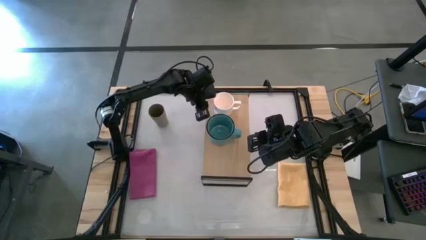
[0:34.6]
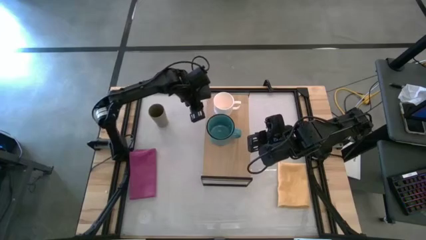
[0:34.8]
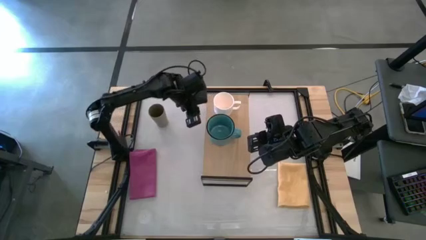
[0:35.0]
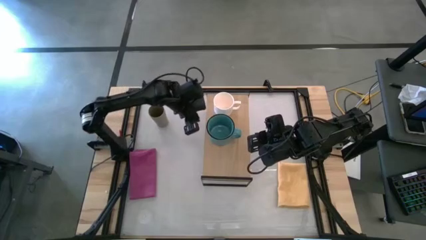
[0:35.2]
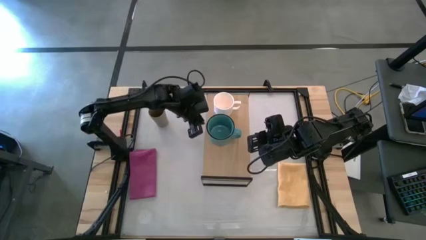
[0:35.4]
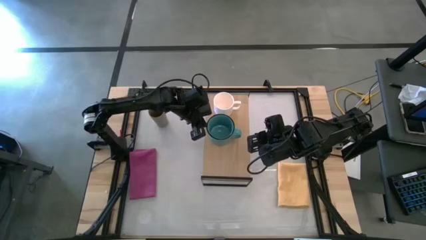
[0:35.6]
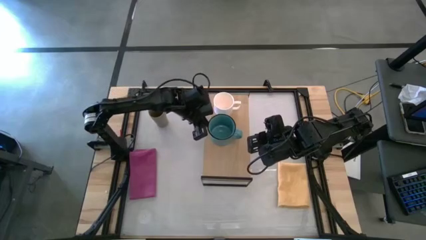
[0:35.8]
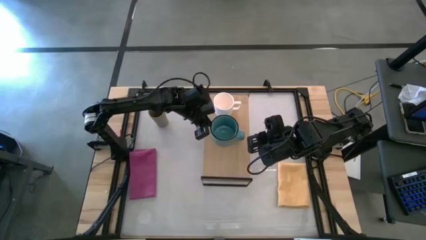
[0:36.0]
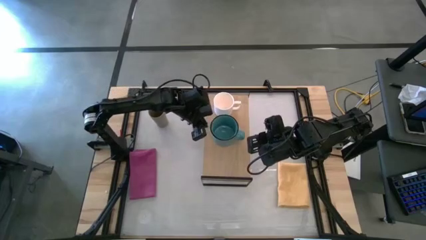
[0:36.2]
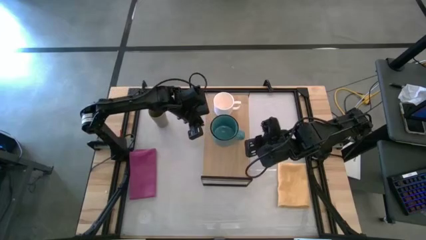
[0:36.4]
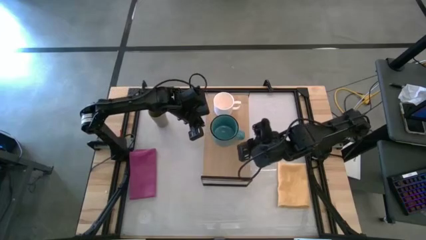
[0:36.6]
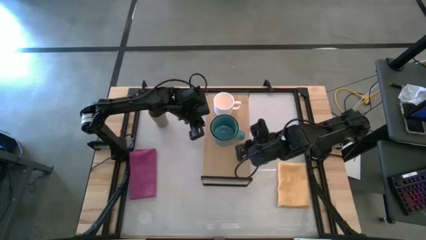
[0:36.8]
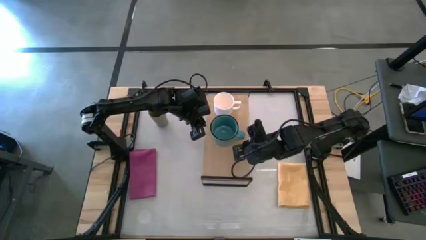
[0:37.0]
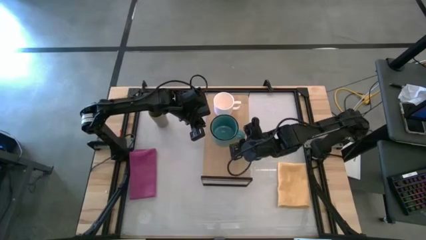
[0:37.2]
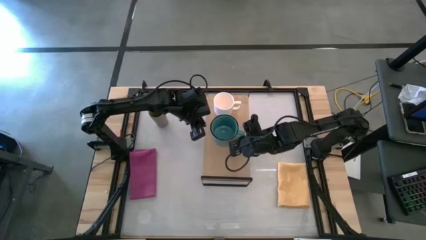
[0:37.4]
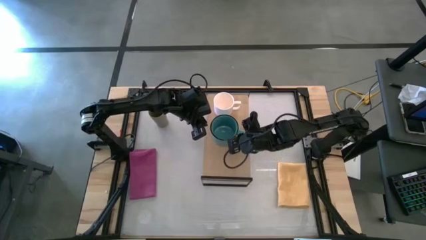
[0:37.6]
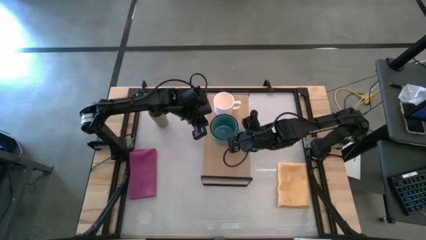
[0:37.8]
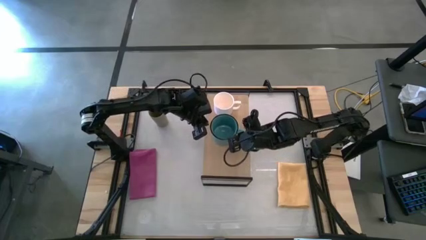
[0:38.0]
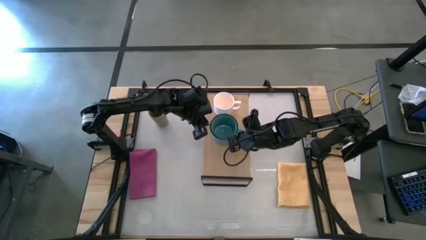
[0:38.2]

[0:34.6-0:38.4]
Task: Stack small to large cups/mugs on shelf
Adjust the blue green mug on the shelf

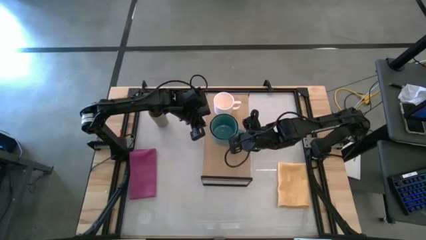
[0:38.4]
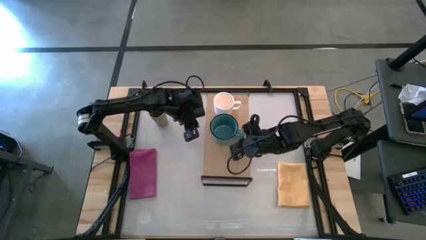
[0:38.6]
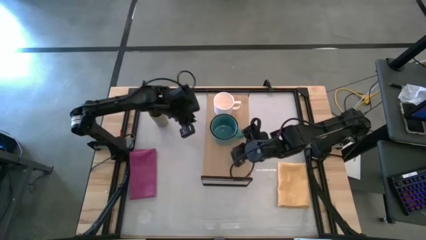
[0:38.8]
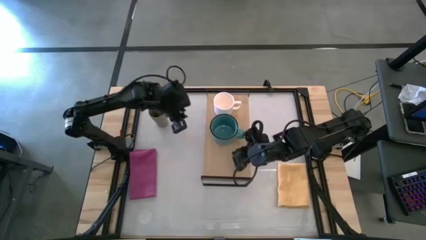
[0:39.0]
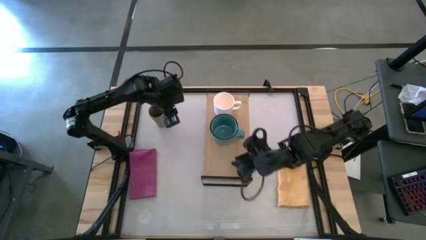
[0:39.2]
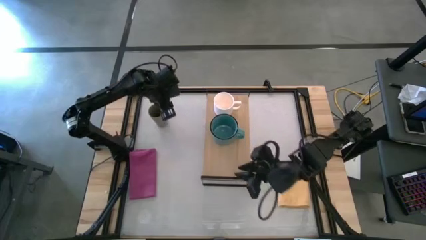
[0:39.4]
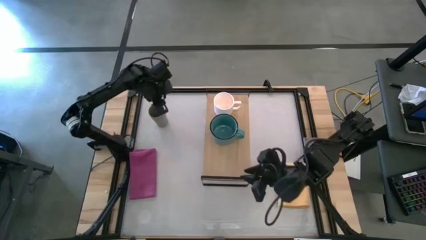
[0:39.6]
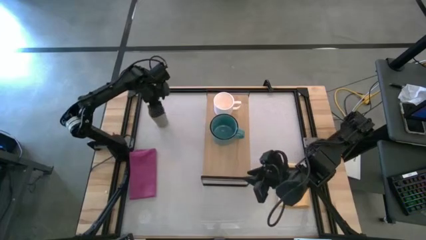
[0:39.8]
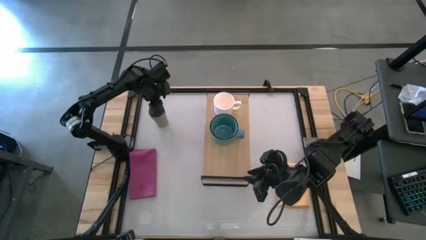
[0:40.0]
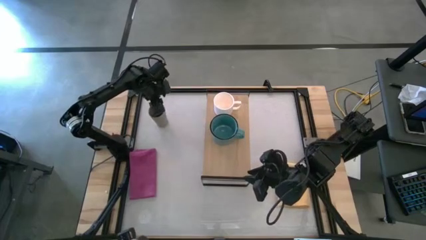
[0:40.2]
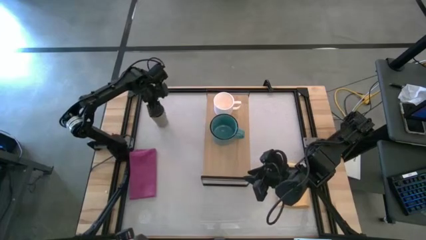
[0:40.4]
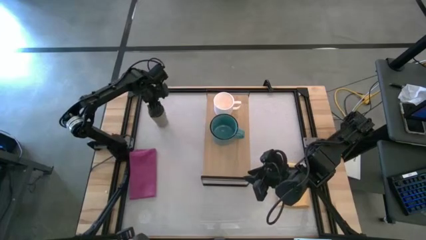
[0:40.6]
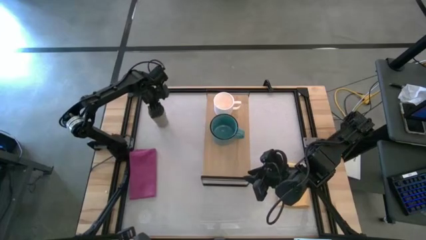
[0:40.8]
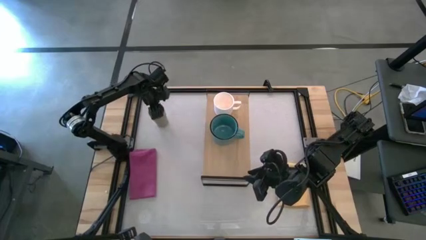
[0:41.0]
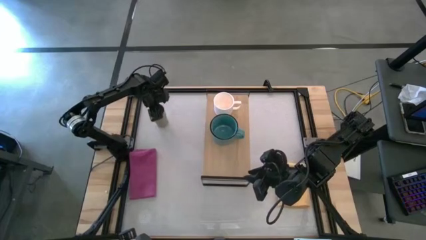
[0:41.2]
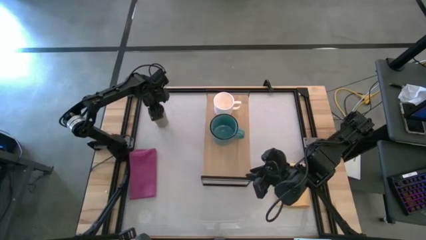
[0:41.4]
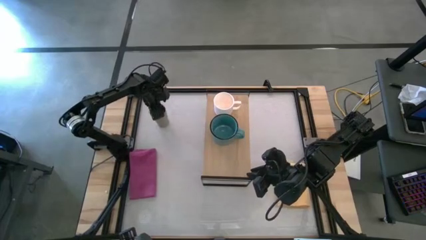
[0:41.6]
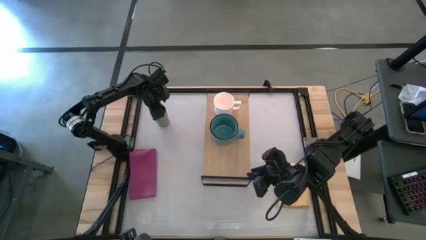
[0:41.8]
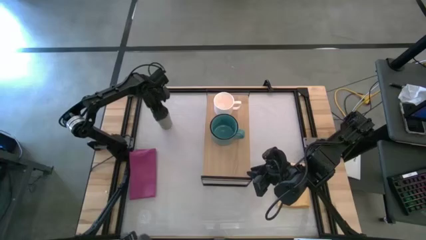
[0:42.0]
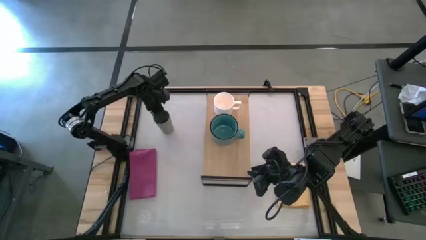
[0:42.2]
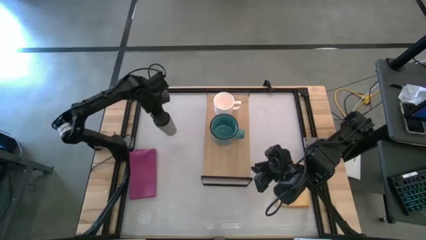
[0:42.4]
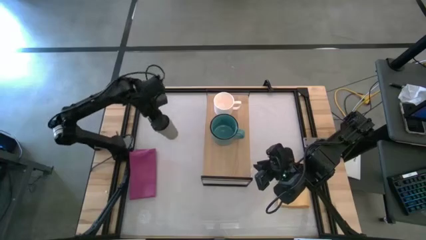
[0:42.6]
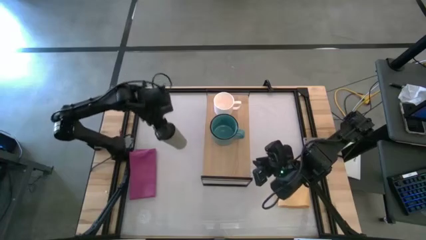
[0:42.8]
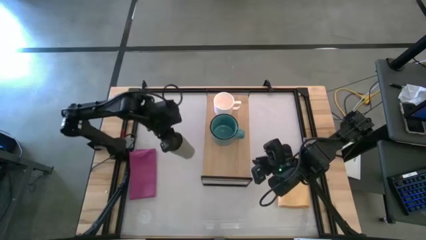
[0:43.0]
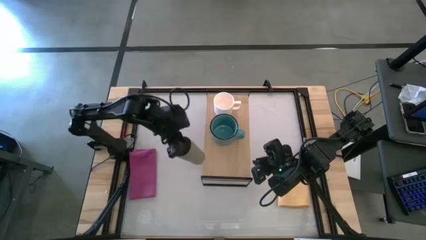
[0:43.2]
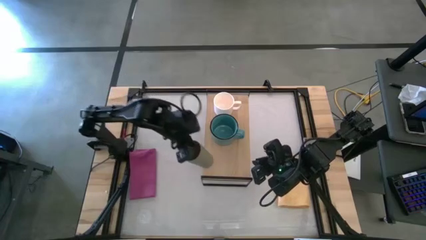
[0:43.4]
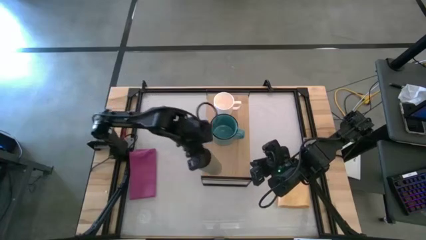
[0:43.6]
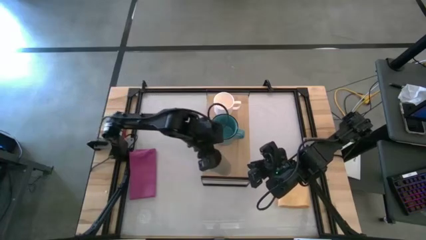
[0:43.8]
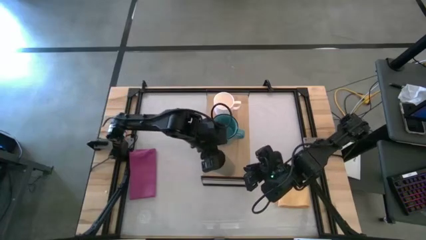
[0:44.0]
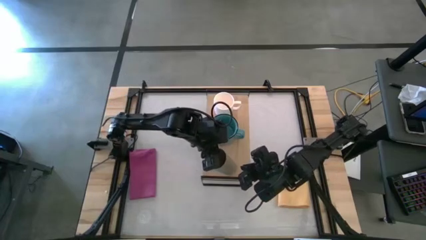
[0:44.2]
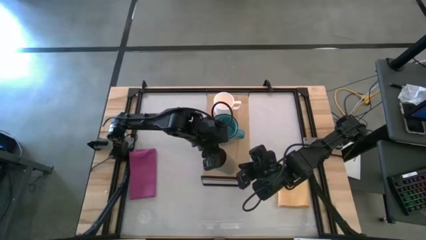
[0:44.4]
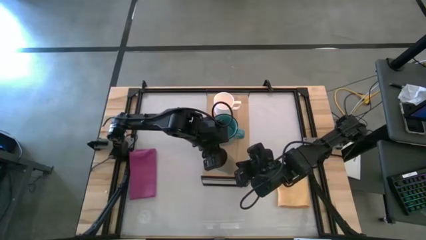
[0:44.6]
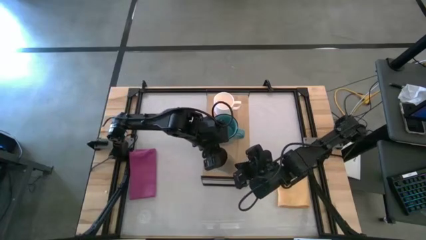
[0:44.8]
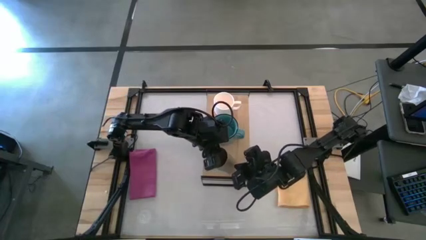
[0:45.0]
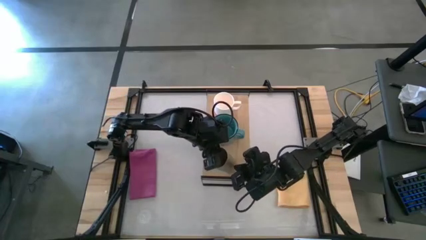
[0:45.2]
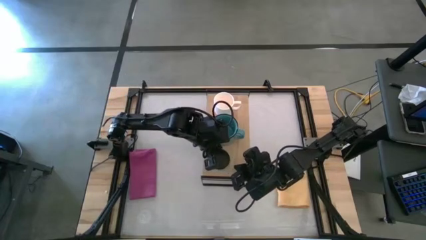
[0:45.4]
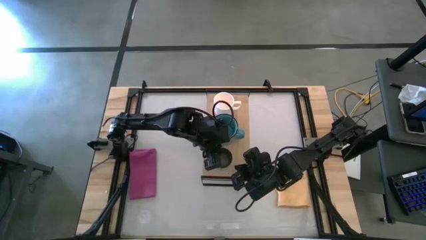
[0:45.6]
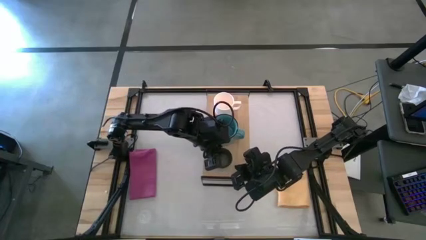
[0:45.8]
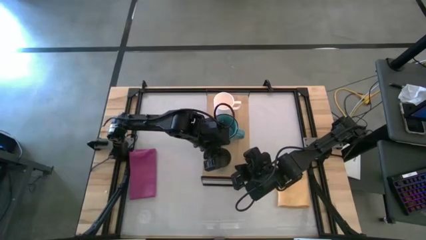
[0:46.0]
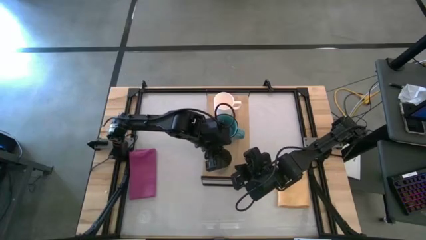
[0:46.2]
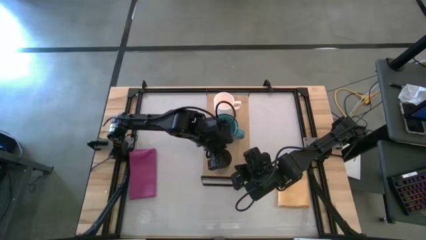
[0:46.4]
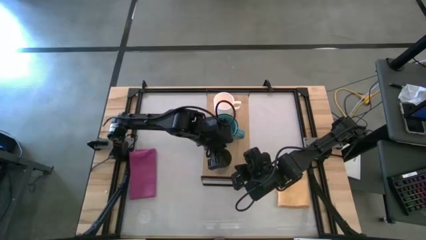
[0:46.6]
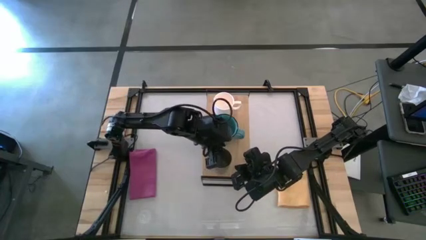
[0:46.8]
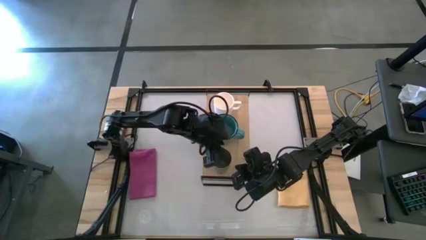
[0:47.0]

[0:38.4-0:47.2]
Put the gray cup on the shelf

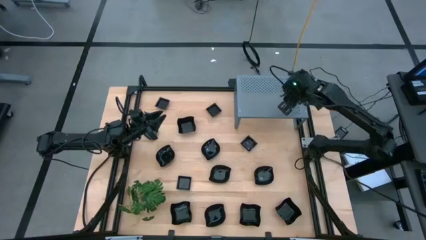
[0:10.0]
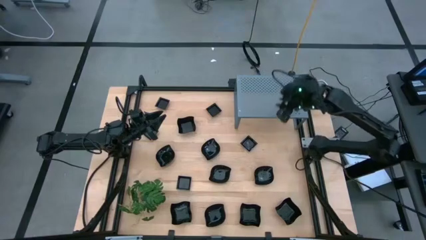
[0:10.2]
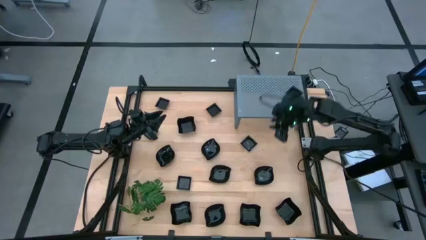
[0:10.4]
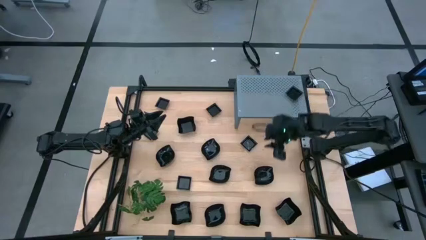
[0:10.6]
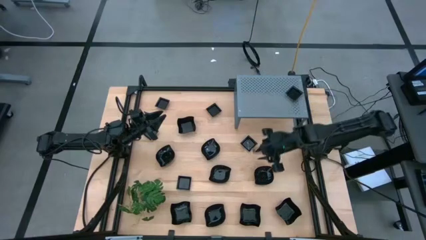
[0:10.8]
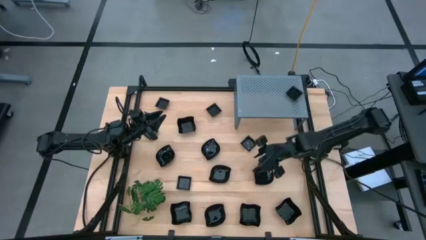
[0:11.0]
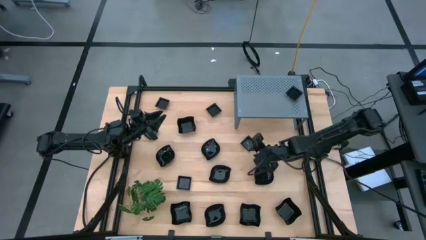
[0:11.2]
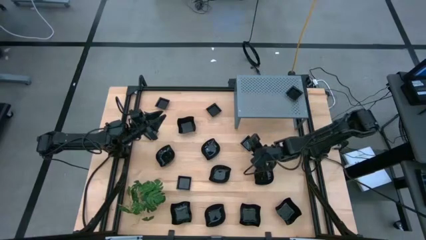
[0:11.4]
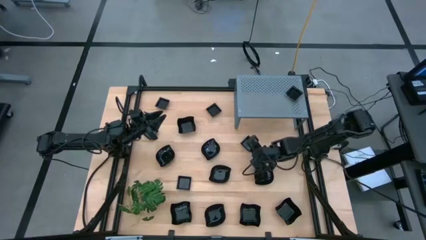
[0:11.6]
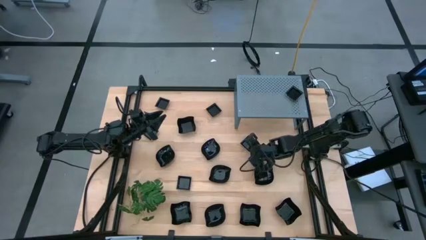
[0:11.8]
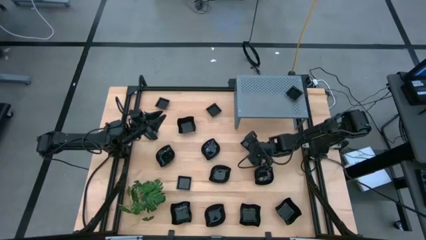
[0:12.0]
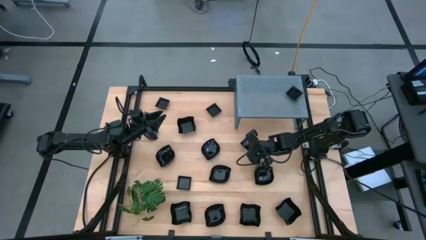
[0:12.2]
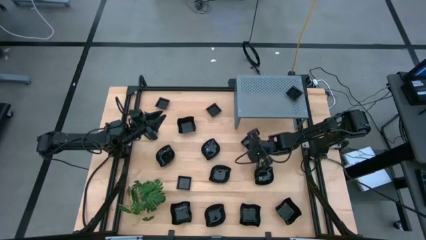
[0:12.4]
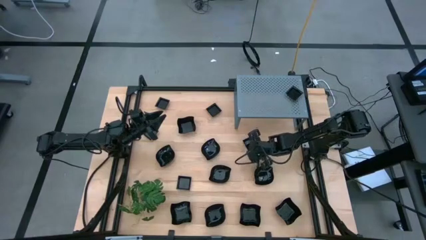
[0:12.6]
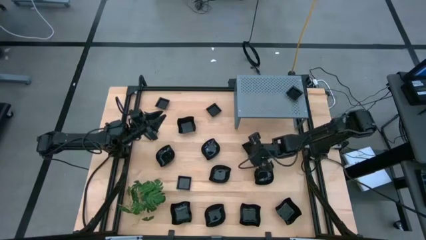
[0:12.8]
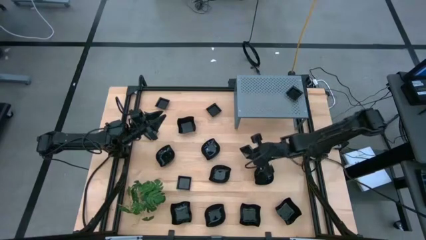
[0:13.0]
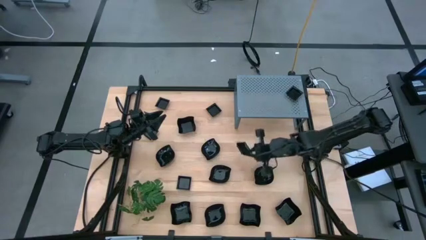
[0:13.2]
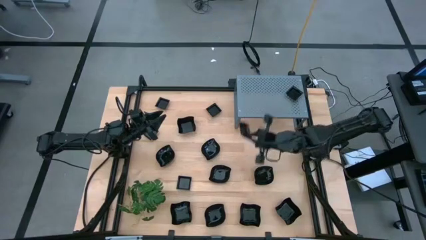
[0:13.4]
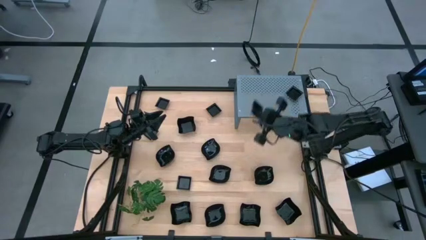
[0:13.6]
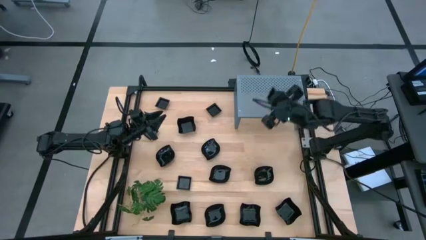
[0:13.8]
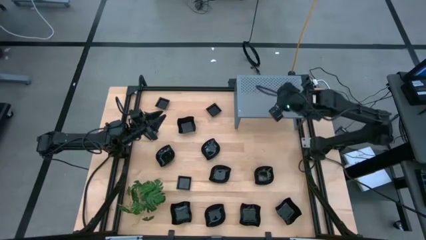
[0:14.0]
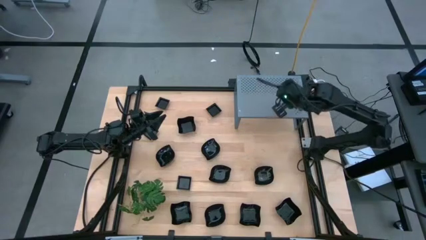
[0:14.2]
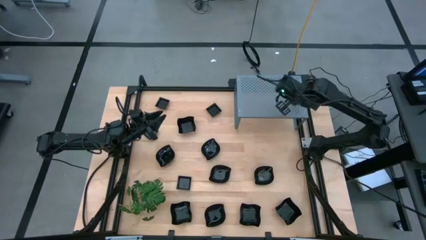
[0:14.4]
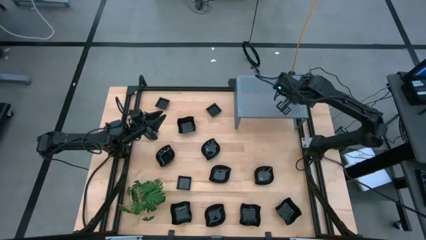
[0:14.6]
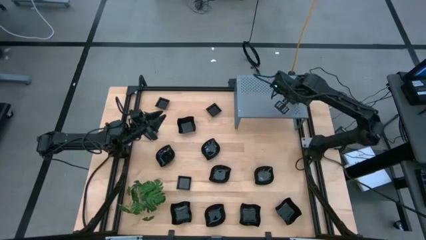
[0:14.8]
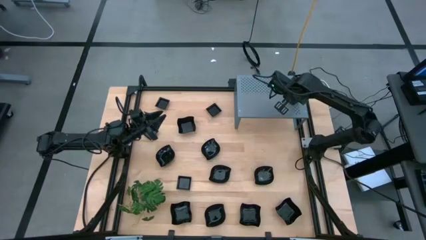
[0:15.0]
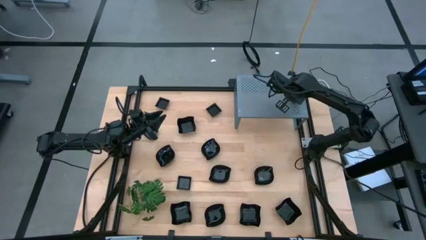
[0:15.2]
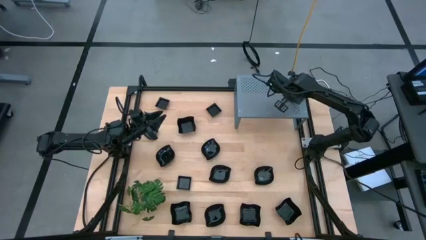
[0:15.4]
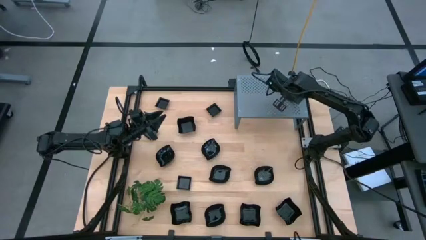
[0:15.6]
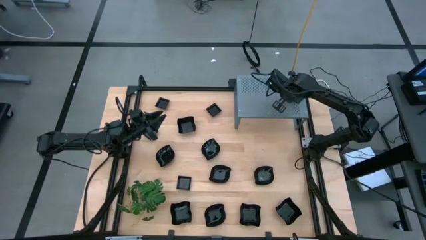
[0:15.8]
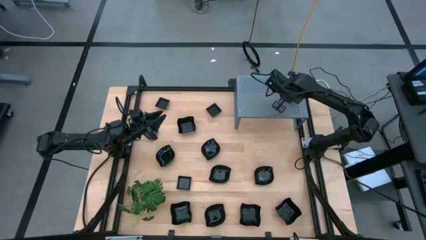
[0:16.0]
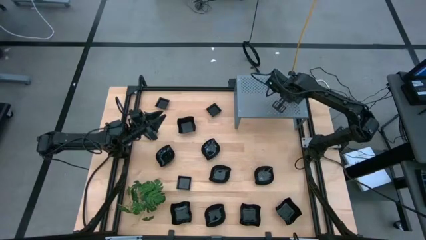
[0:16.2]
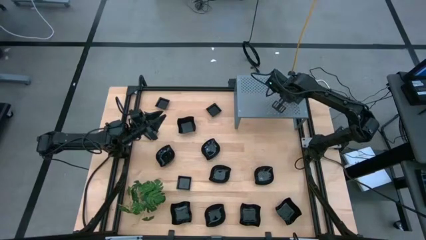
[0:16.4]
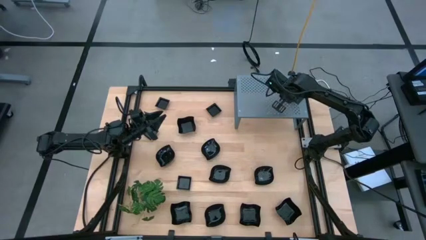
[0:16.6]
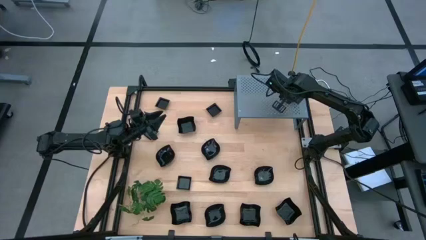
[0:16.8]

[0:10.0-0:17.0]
Task: Pick & Place Mini shaped plates
Stack the black square plate on top of the black square plate on the shelf
